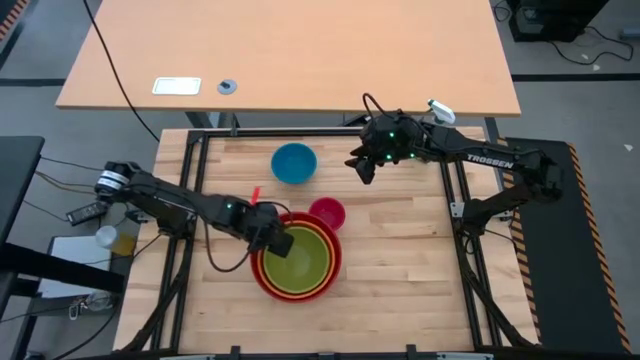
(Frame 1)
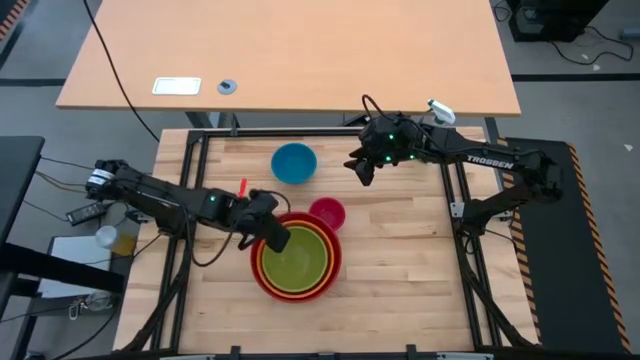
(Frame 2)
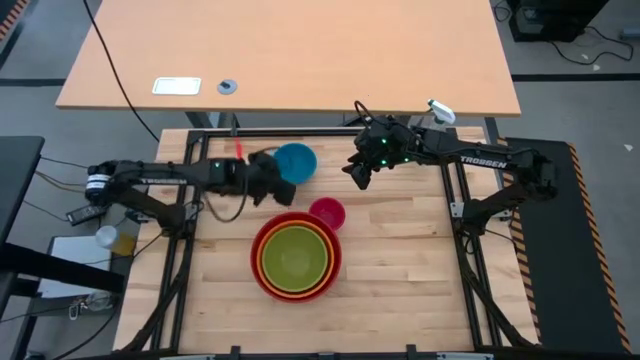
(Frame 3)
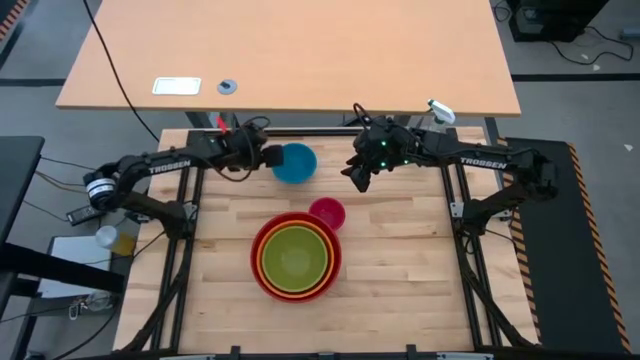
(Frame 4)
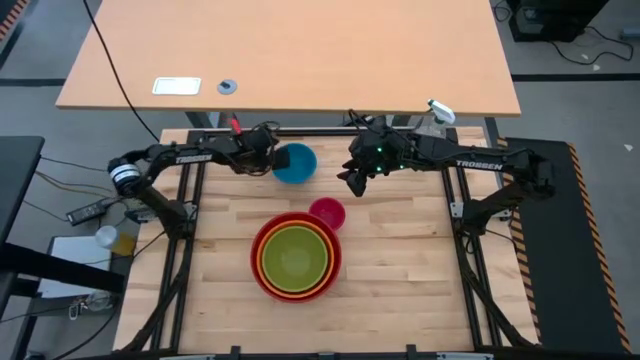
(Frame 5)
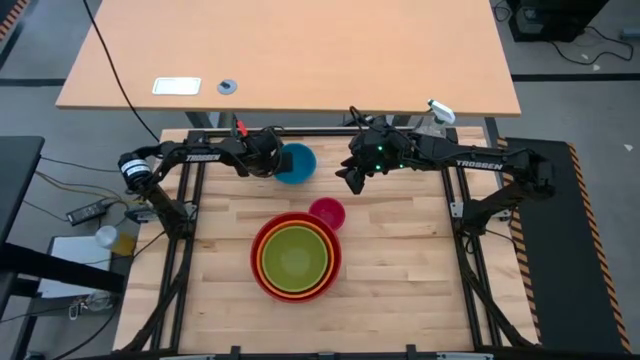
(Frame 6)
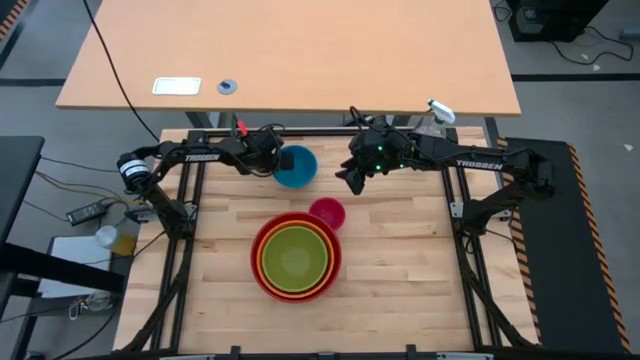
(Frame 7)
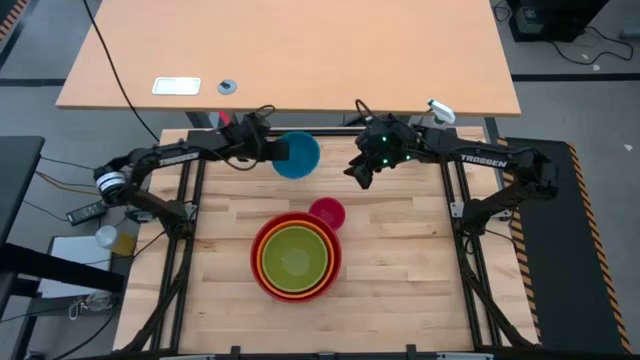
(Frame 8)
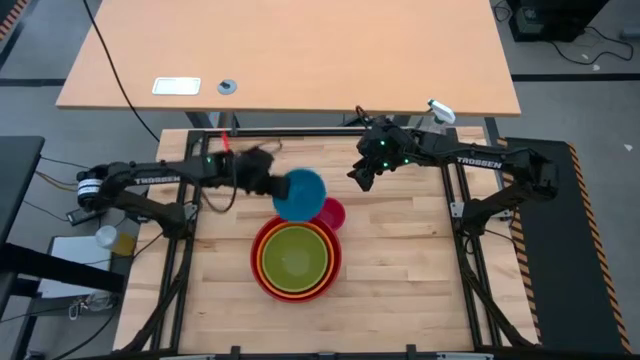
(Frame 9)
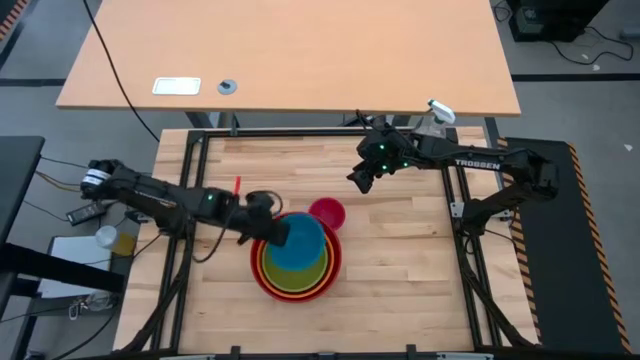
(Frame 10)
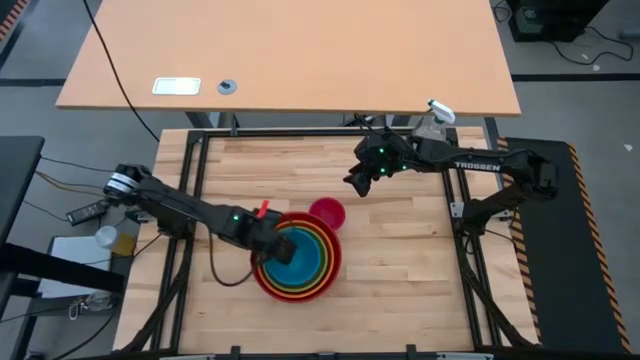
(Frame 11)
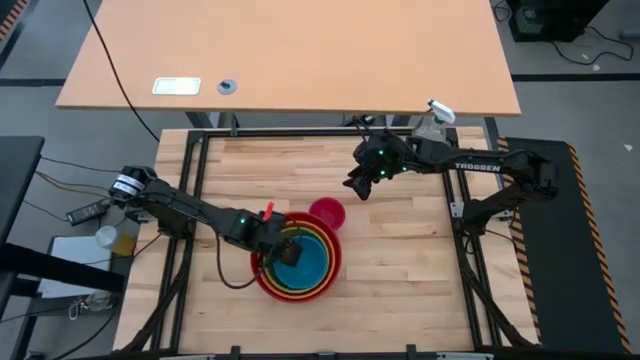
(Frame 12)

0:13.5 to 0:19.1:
Stack the blue bowl on top of the green bowl

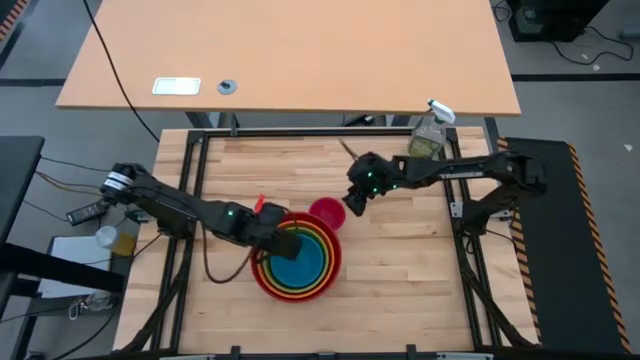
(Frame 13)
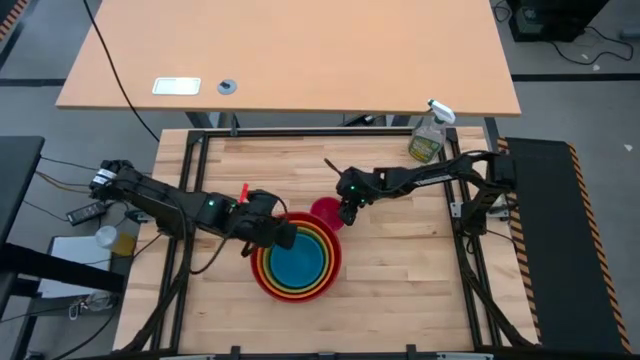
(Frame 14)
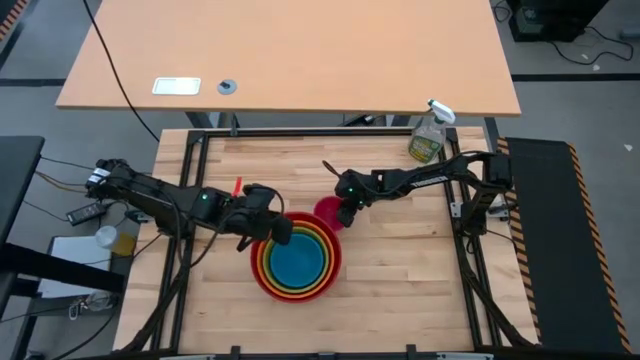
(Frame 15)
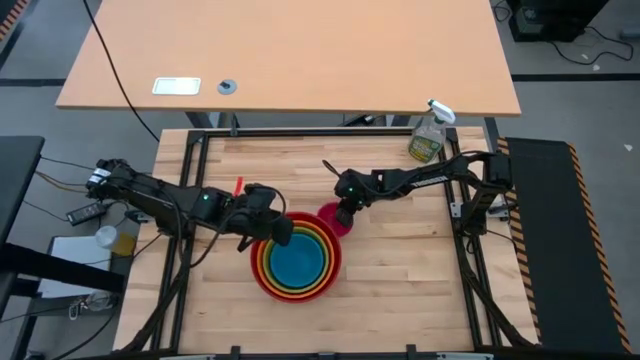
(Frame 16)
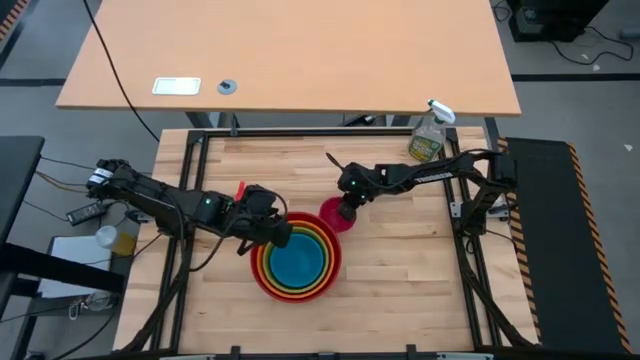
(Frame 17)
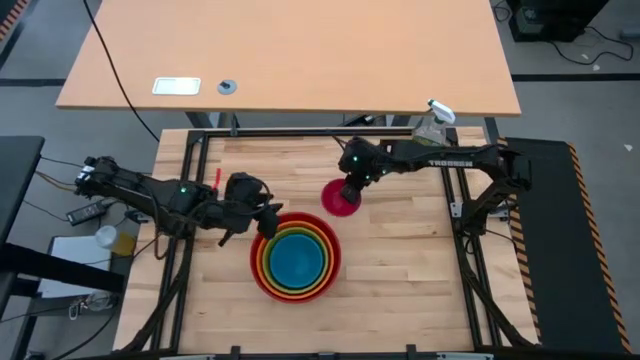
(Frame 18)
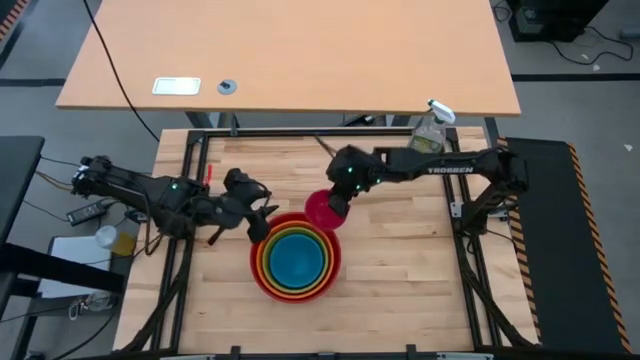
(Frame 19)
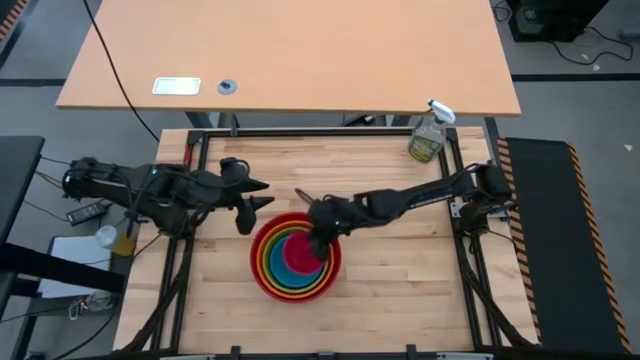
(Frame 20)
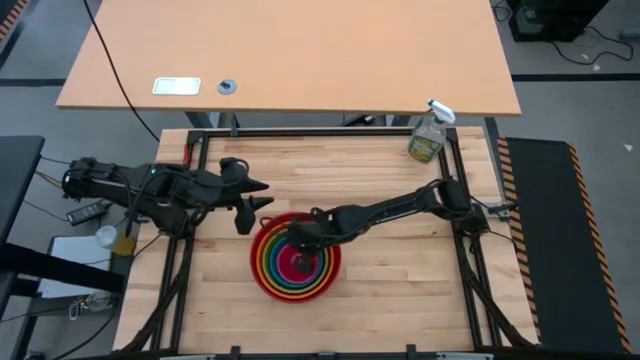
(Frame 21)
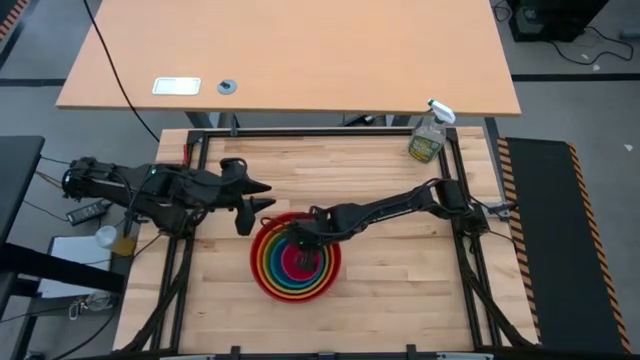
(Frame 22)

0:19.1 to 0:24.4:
Stack the pink bowl on top of the blue bowl

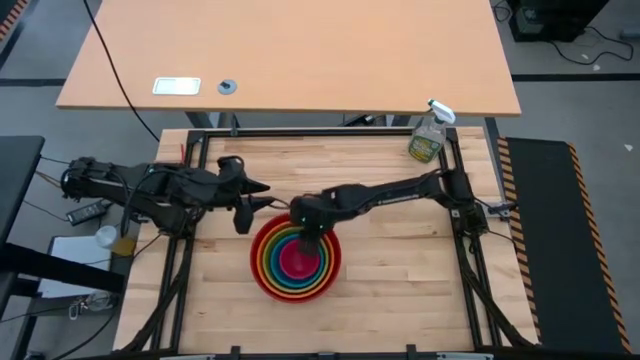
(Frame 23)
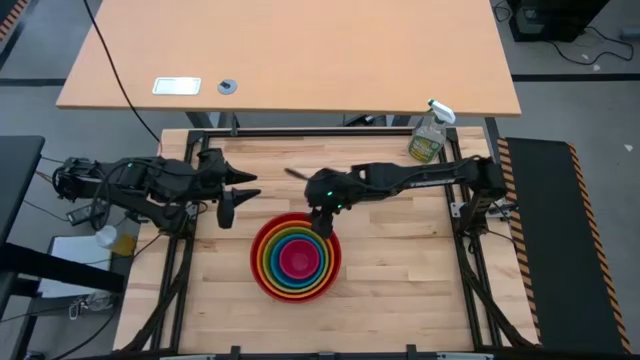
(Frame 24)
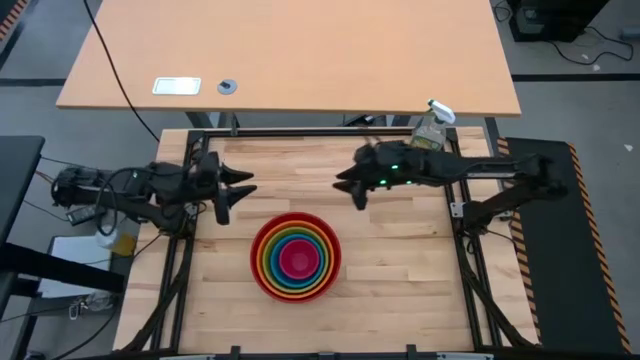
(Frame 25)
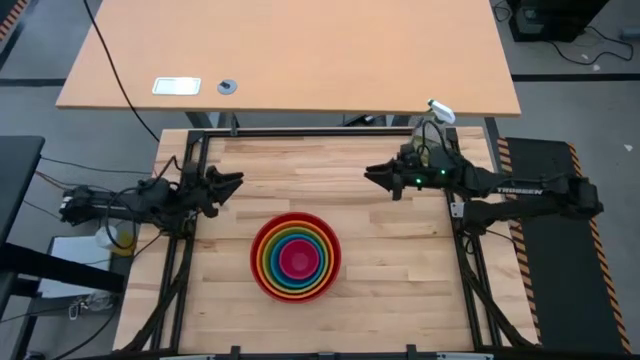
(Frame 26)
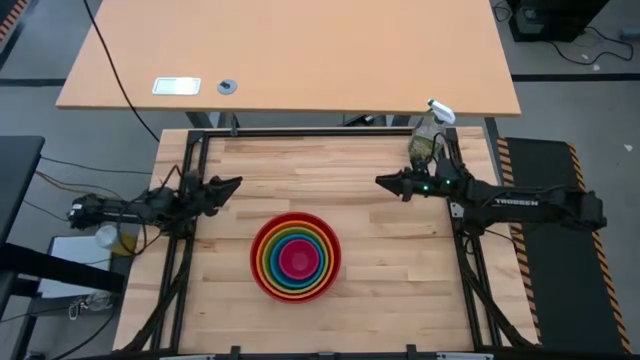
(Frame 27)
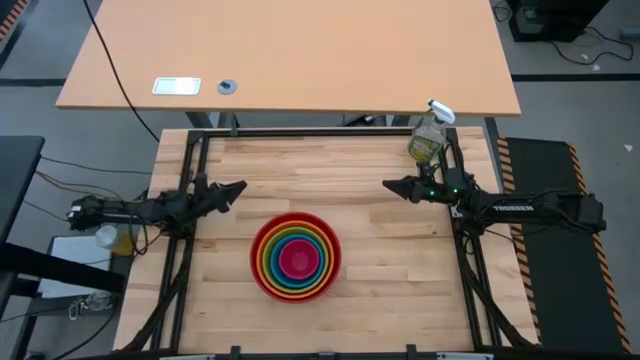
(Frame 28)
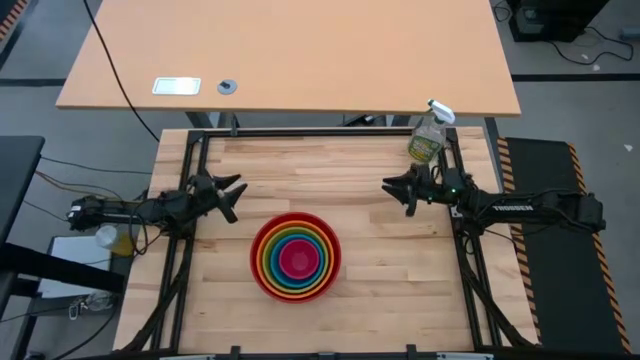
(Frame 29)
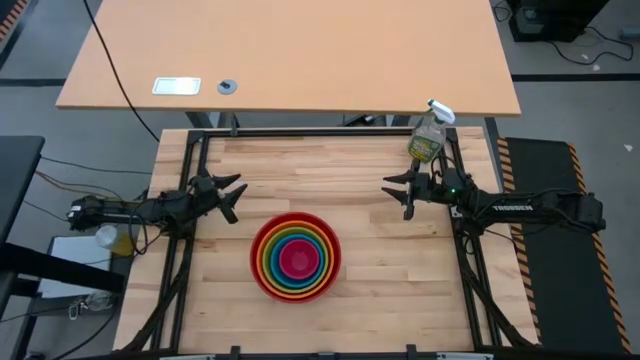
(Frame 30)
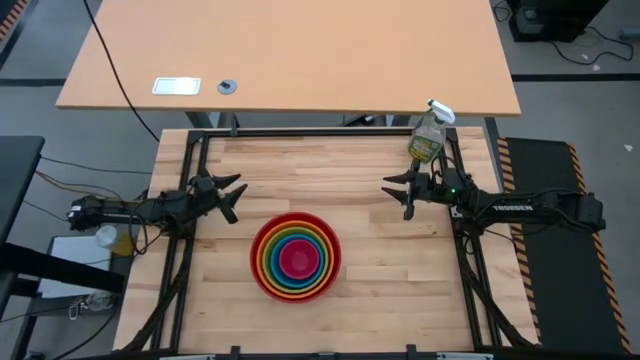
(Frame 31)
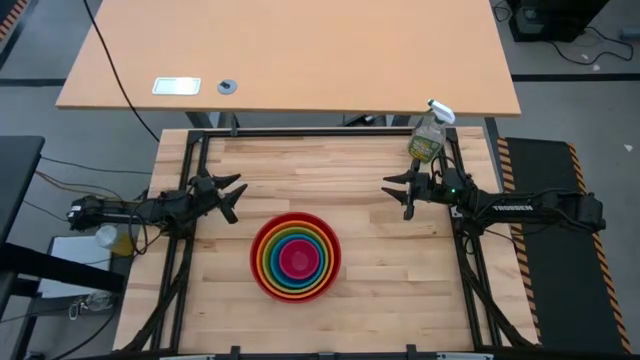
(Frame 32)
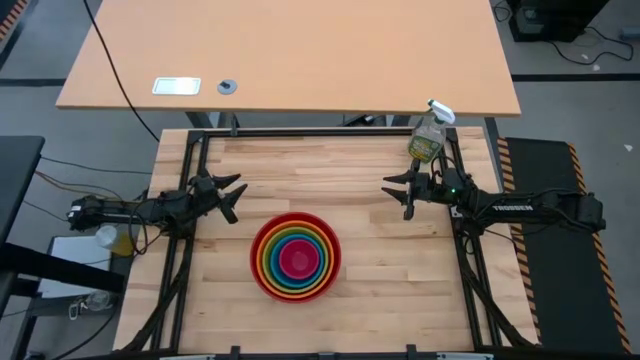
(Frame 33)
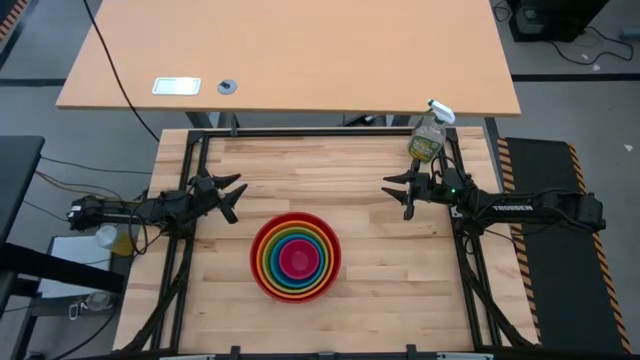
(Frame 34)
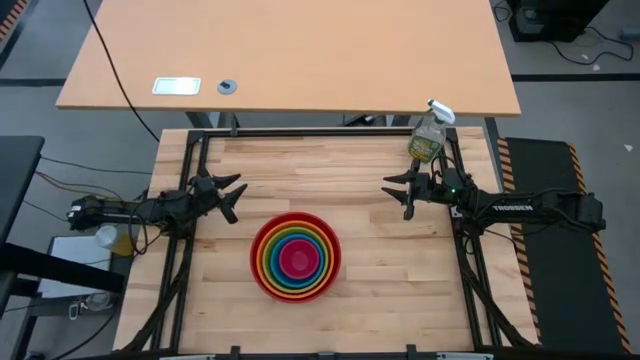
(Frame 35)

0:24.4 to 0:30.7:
Return to Home Position
